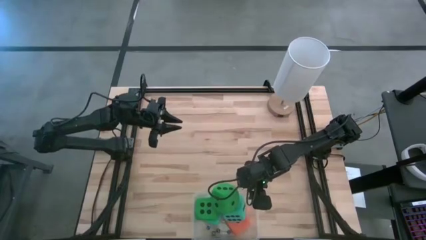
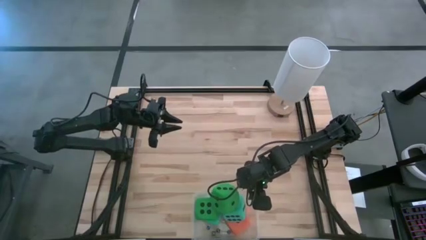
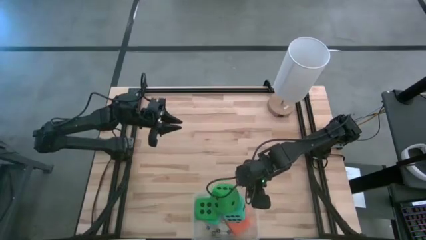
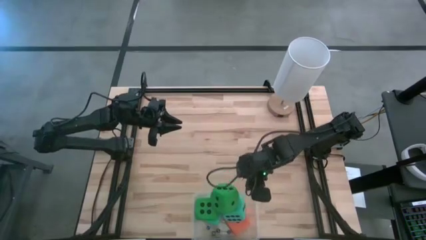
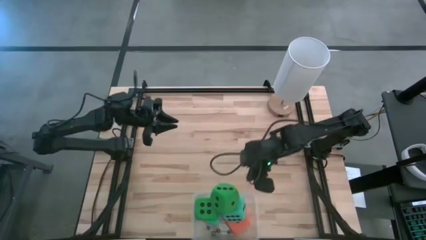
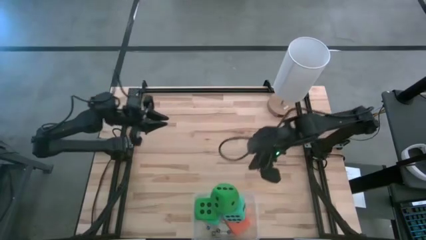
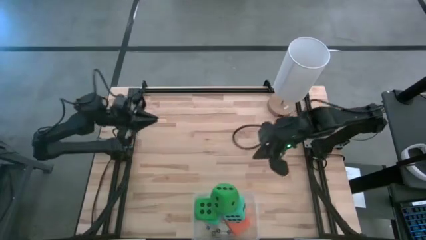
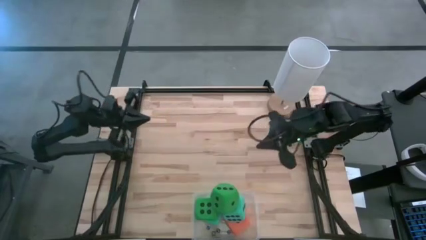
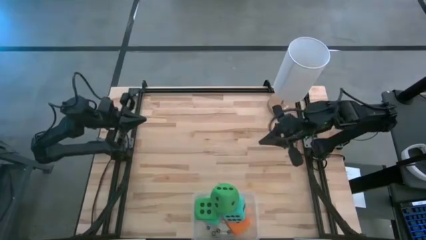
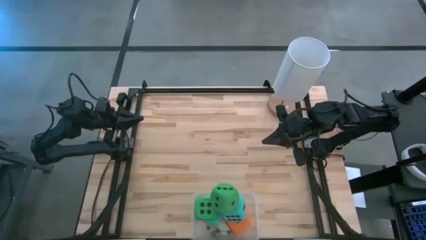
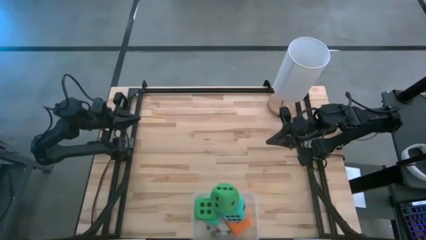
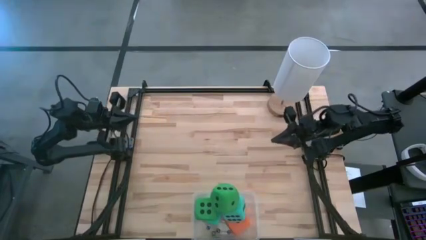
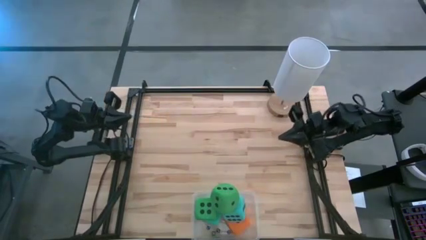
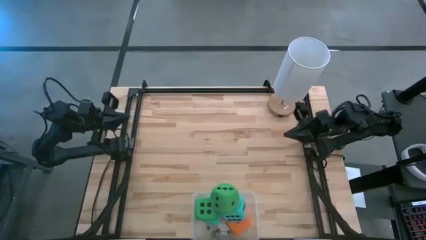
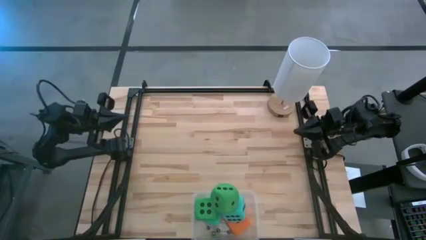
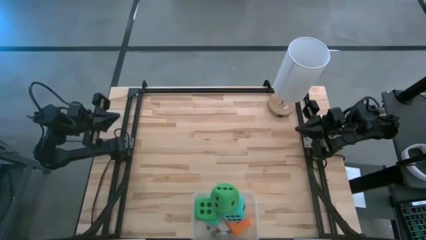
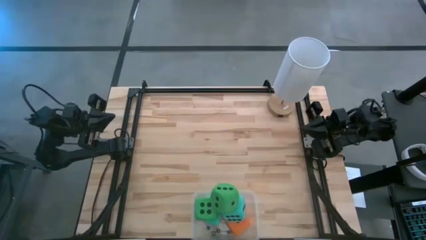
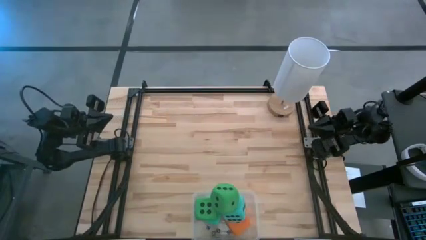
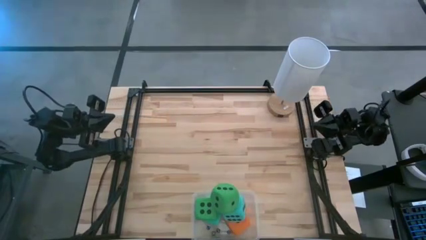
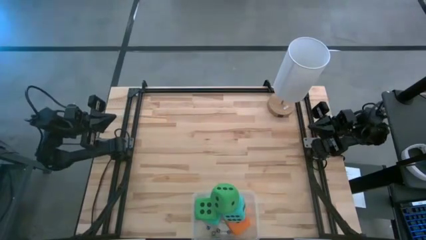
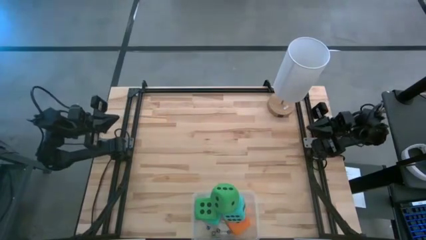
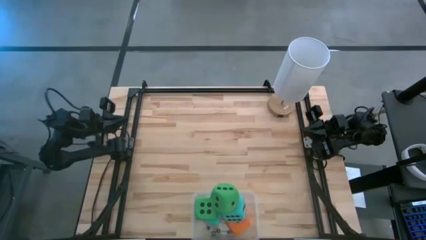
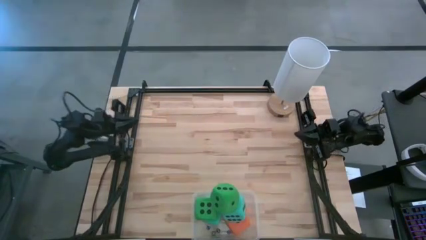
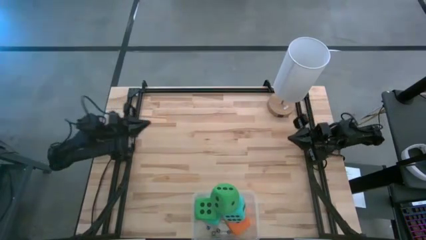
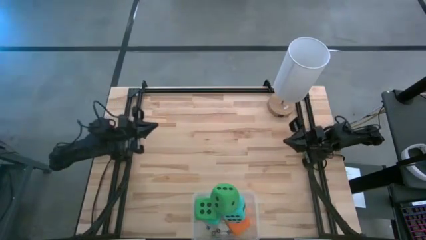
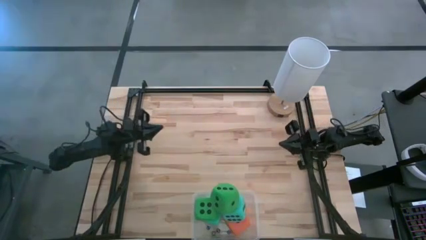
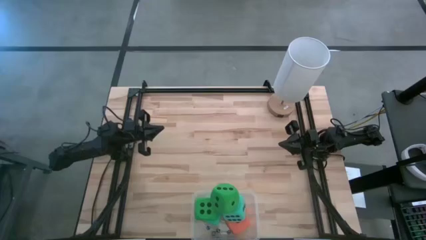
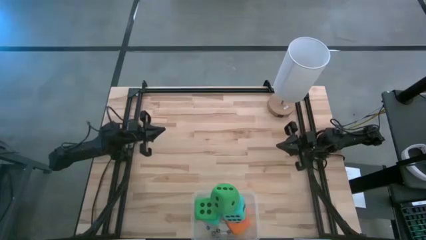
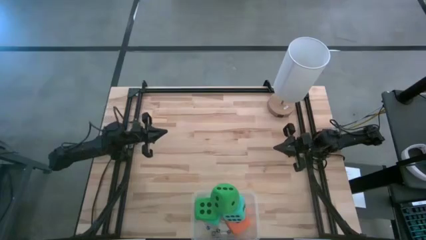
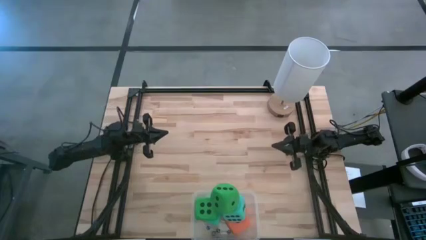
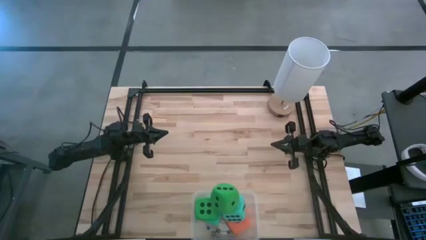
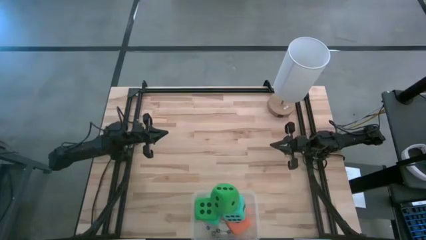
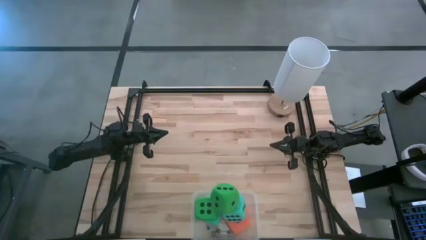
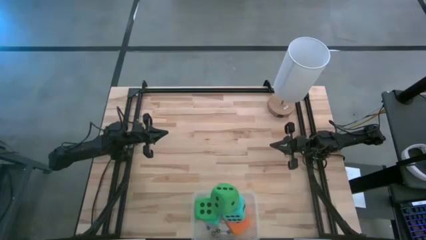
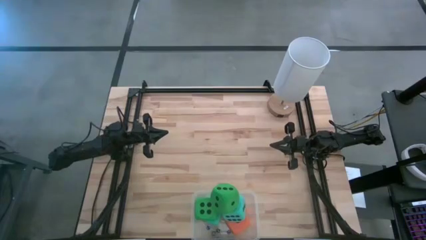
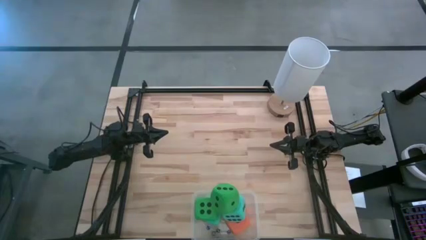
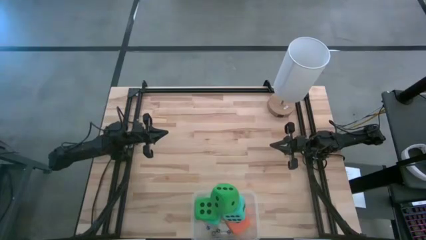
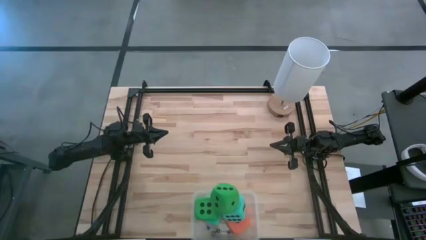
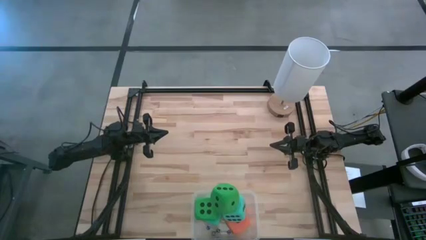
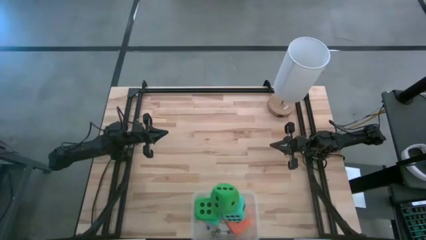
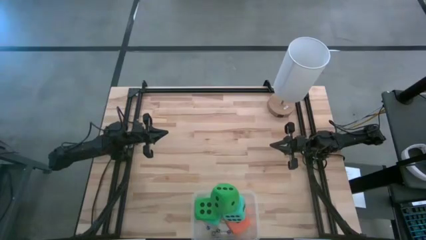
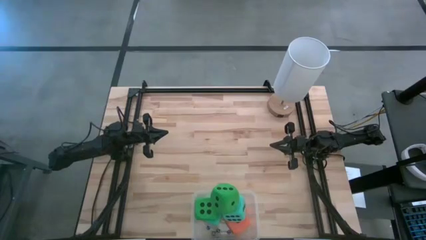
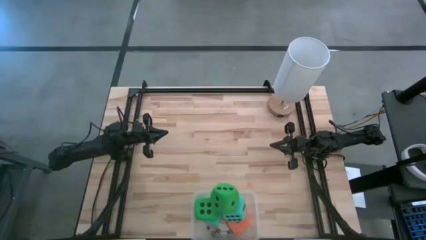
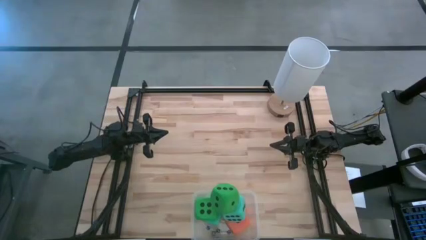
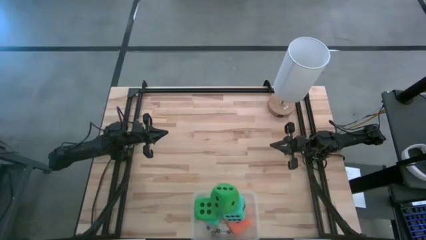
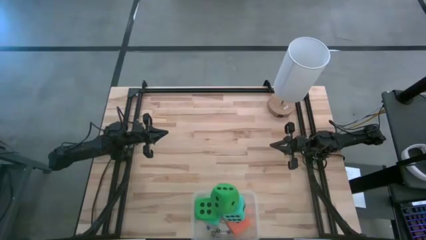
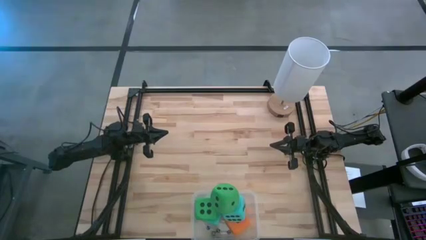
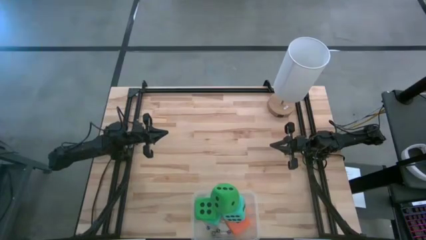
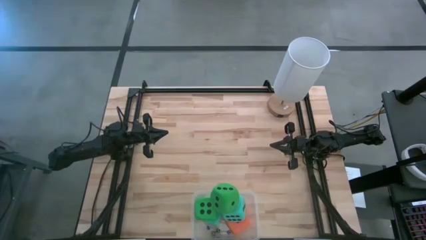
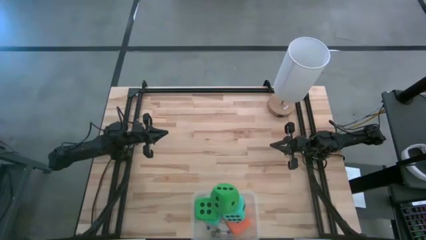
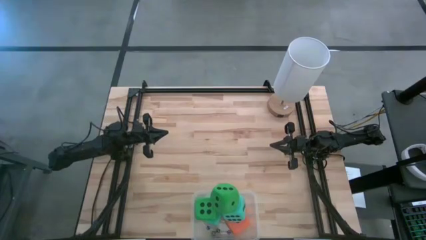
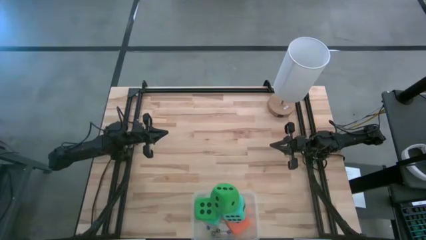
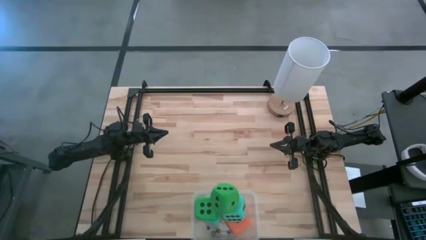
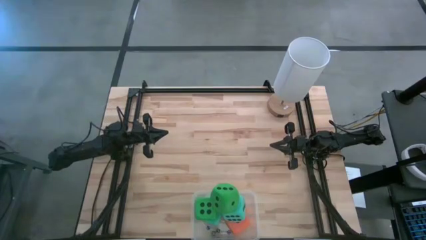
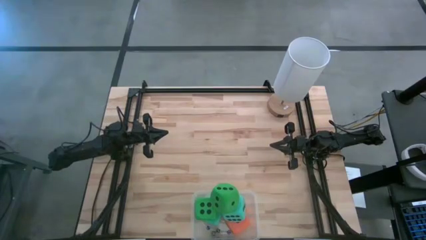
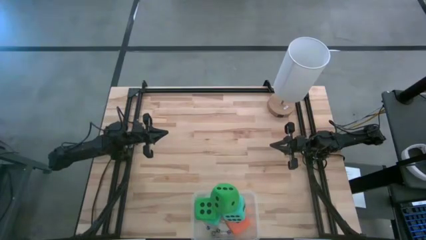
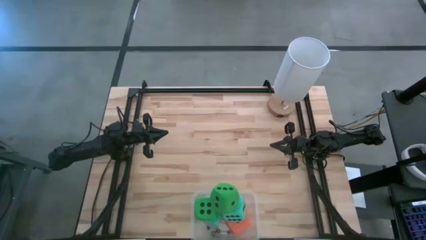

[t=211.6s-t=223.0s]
Task: Pick & Place Dice
Return to Home Position

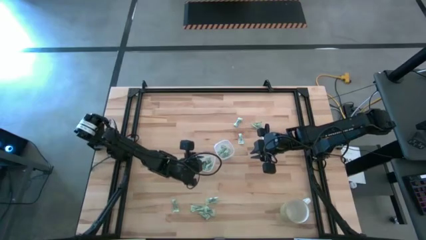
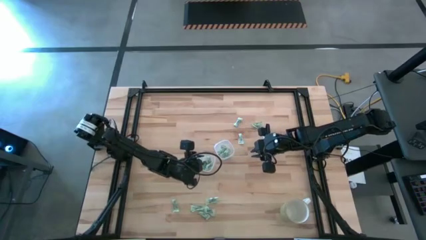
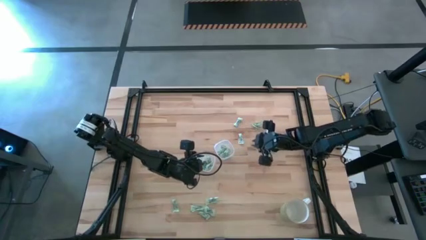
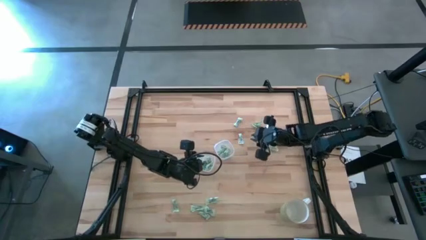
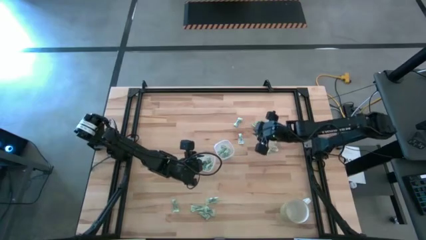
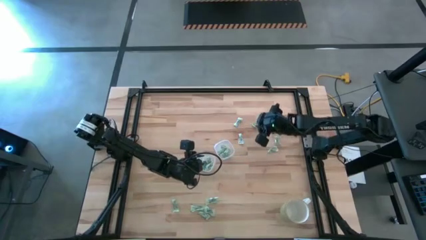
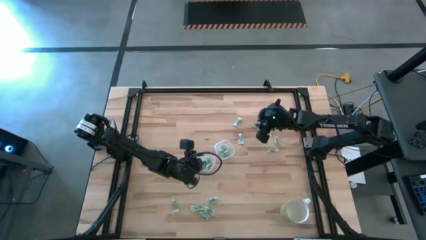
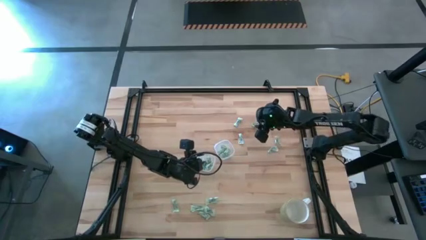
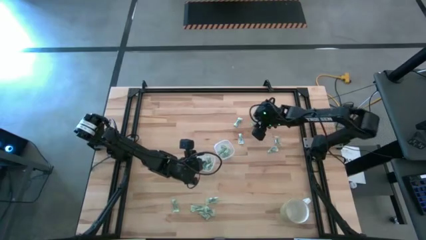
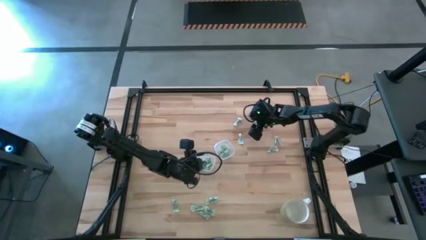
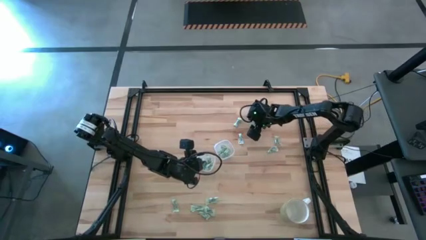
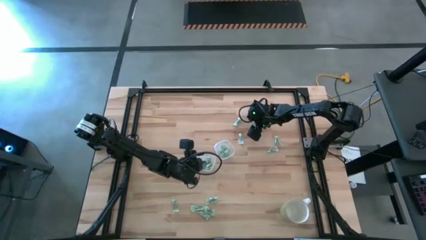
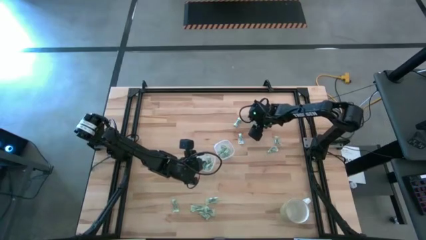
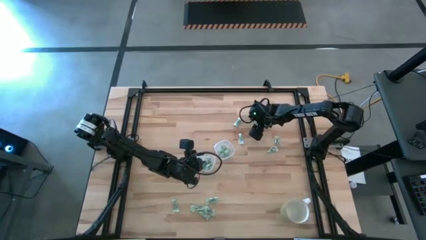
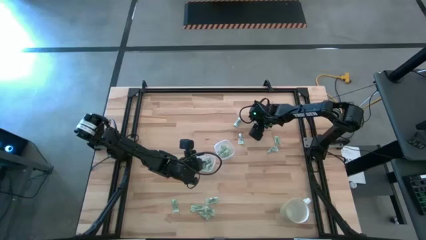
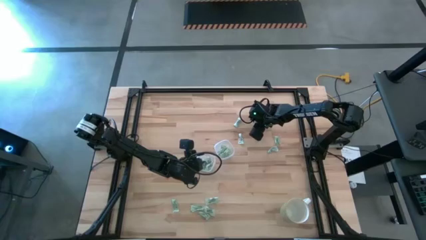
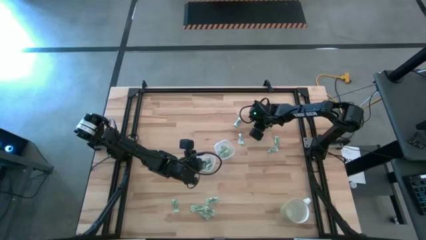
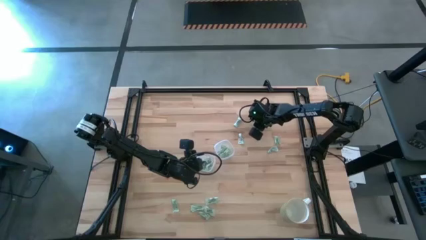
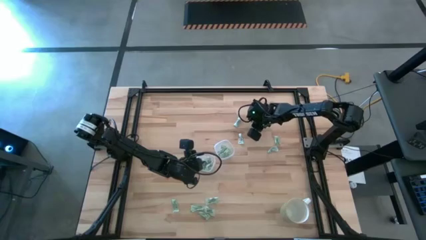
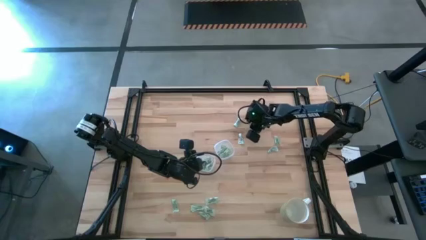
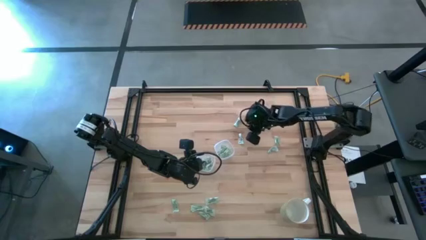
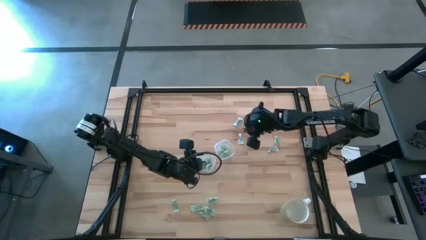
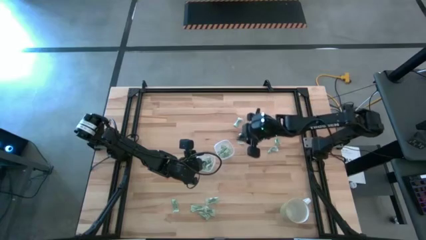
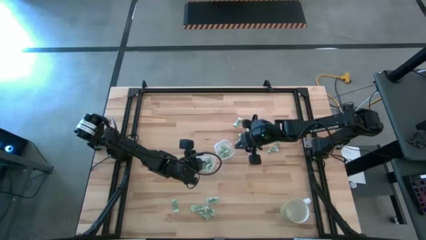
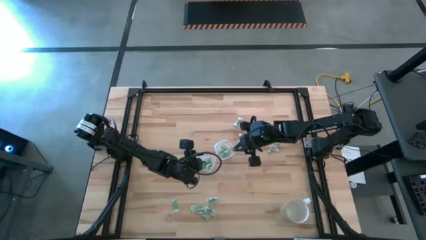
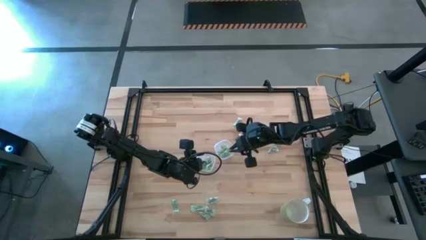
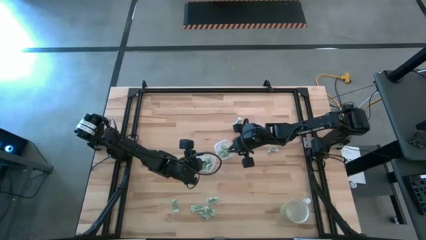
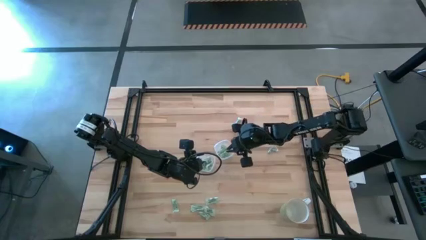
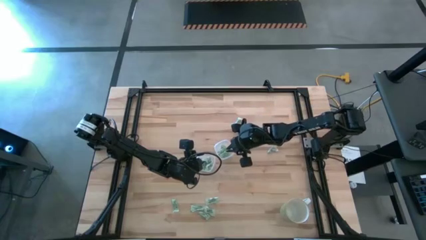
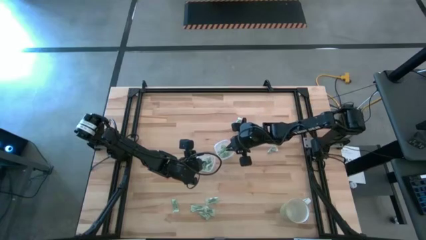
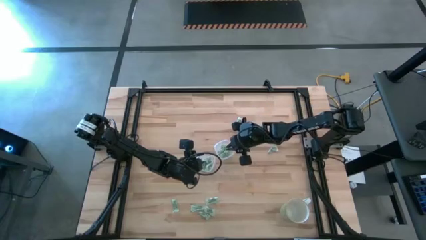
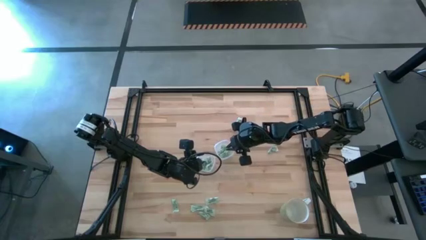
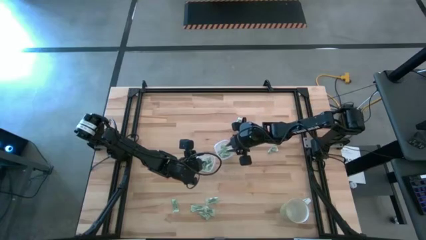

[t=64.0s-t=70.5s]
Task: Pick and place items into bin
Put the stevia packet into the right bin
